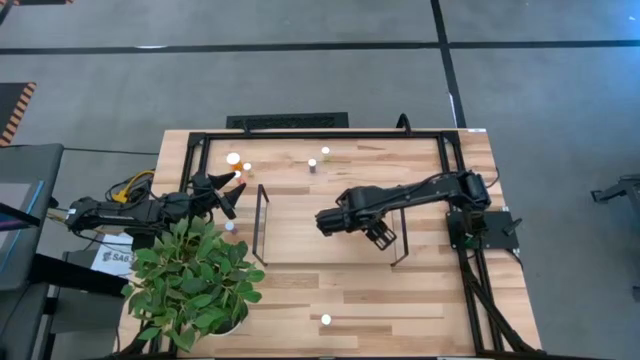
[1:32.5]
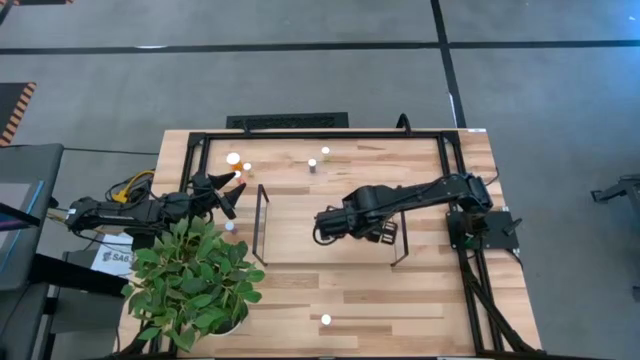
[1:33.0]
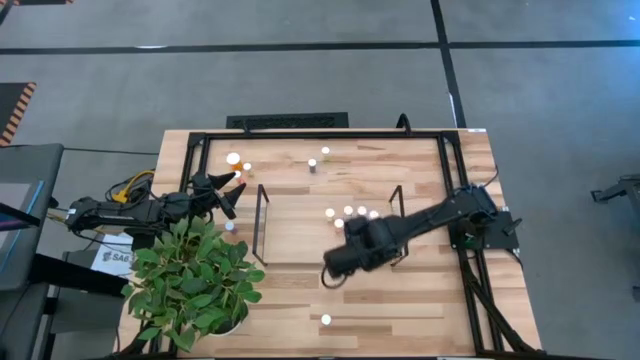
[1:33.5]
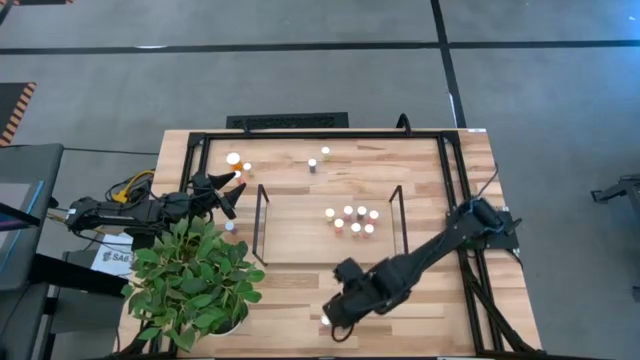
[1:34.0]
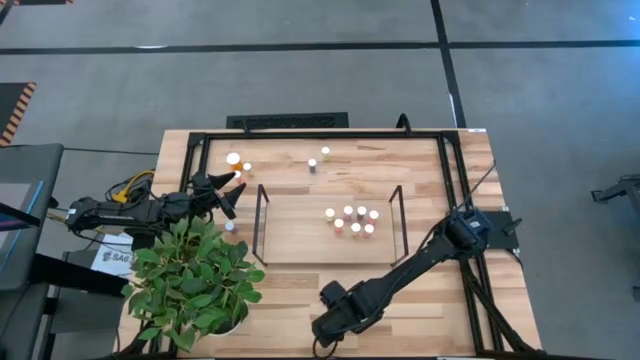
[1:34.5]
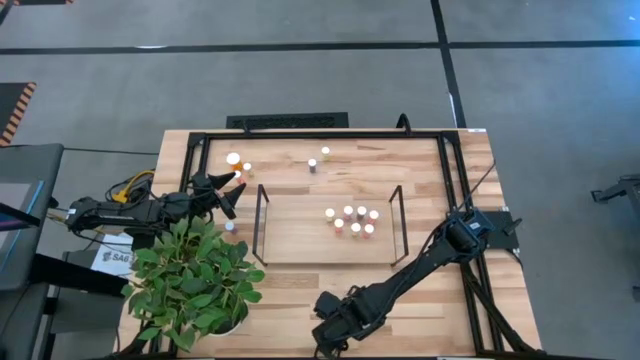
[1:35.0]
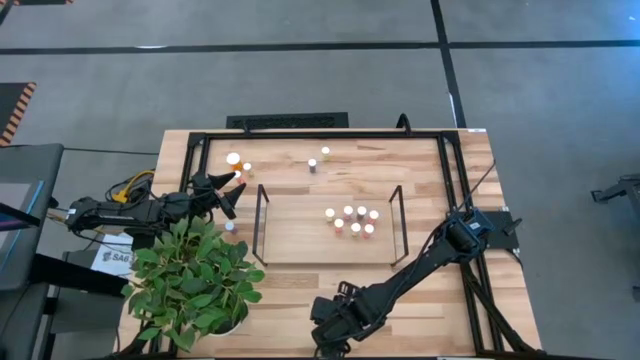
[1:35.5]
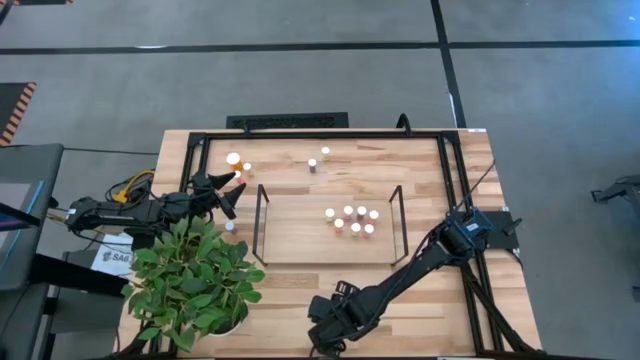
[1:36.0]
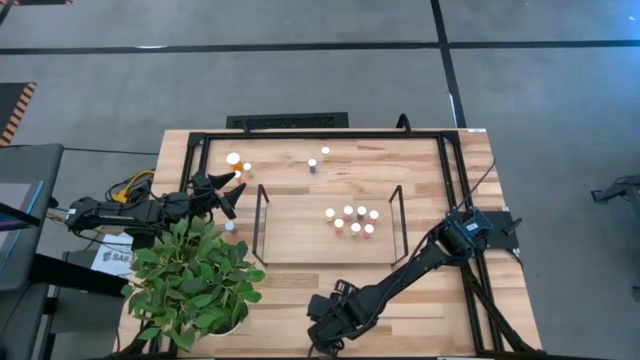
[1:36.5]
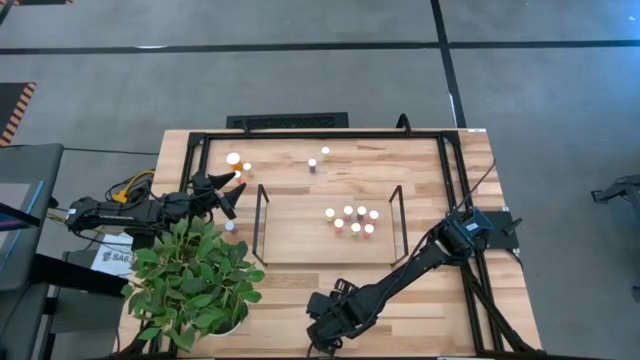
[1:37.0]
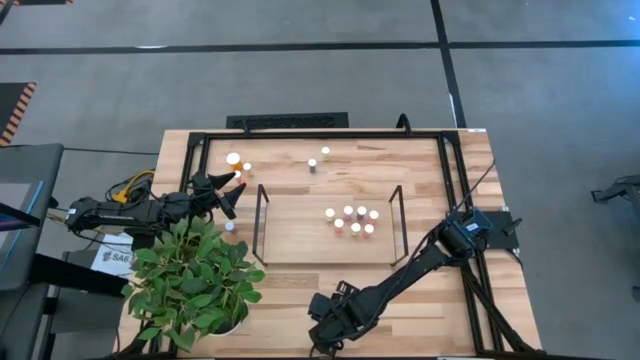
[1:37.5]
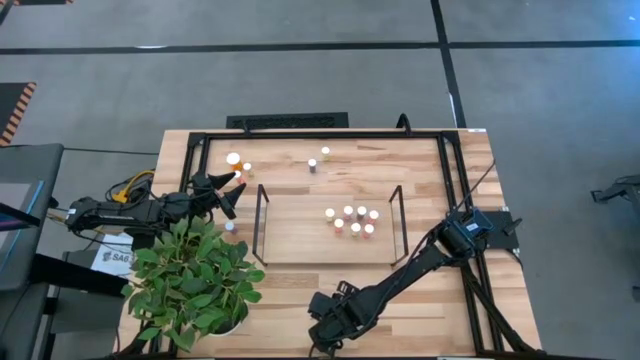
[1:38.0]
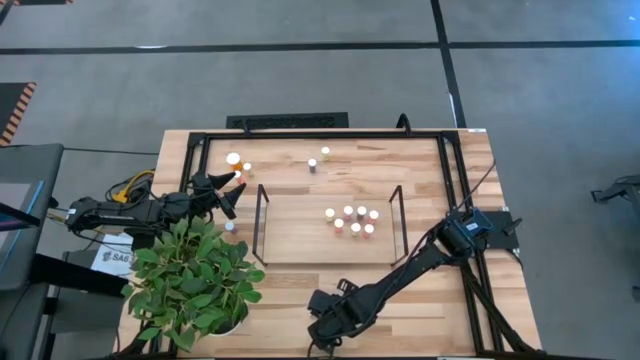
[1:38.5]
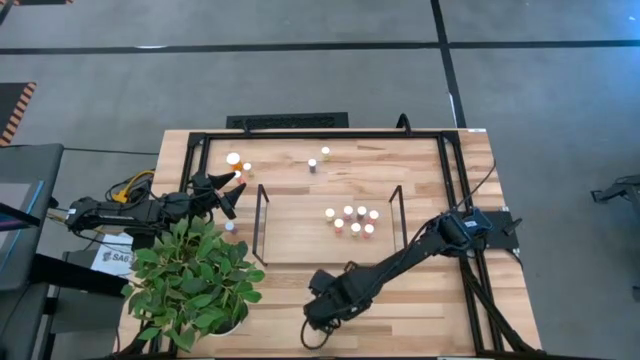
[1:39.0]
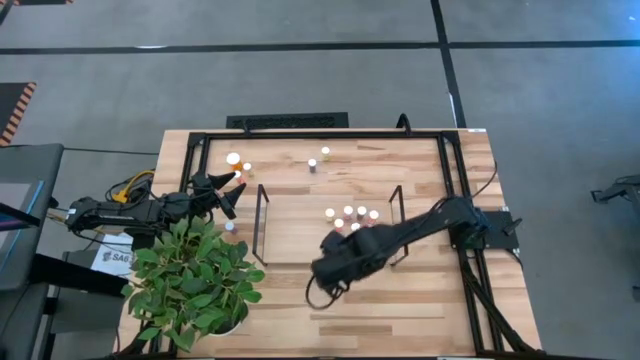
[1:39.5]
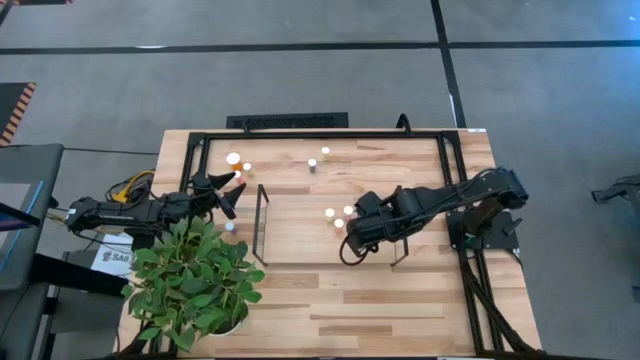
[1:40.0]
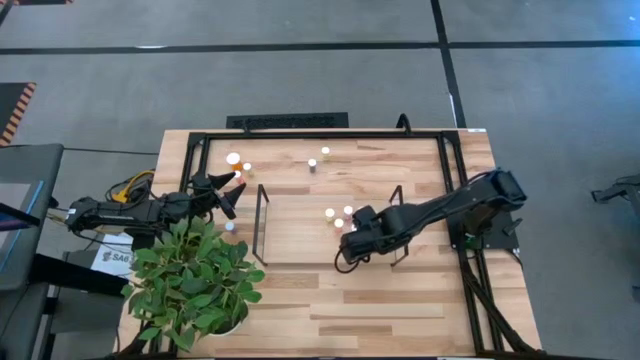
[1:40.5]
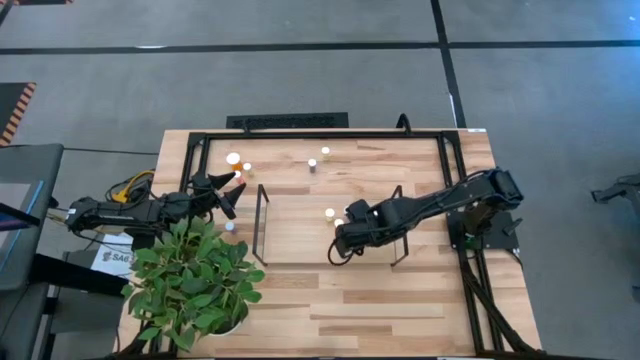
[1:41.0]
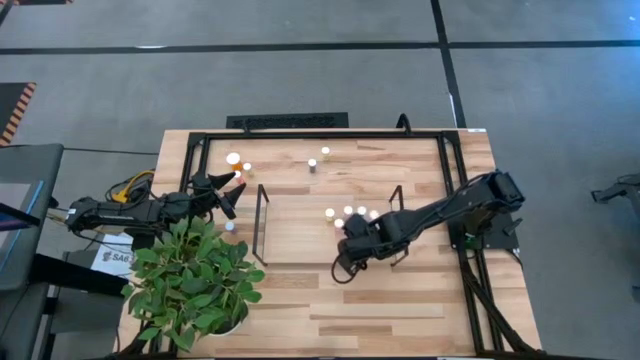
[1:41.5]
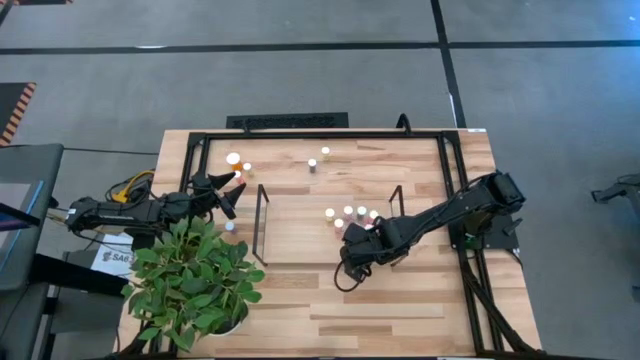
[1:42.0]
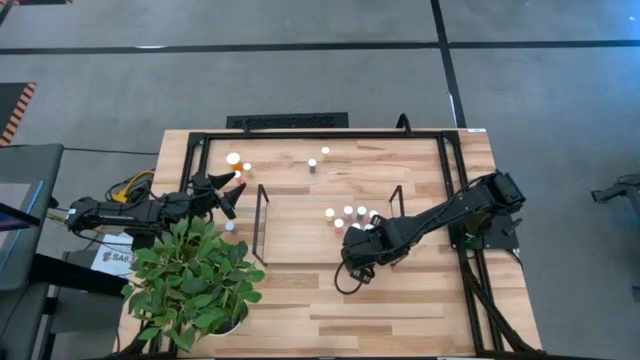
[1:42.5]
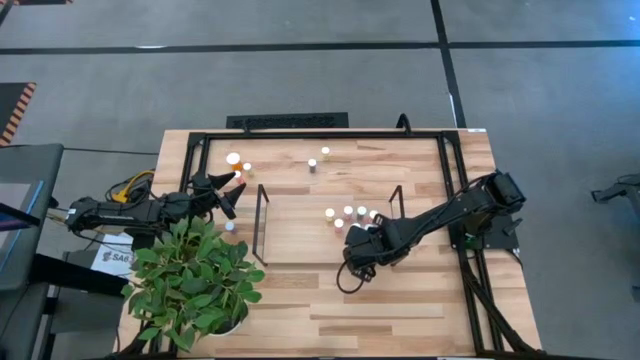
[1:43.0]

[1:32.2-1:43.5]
Task: Pick and place medicine bottles onto shelf by color
Put the red pill bottle on the shelf

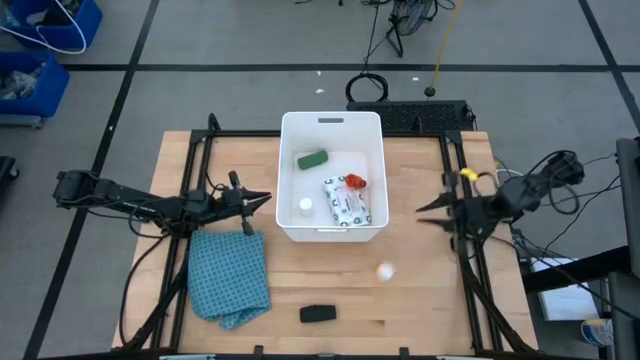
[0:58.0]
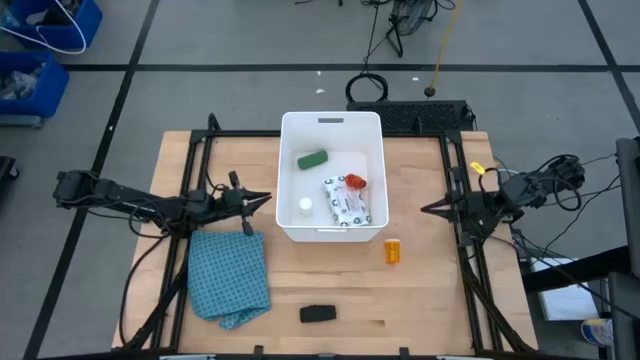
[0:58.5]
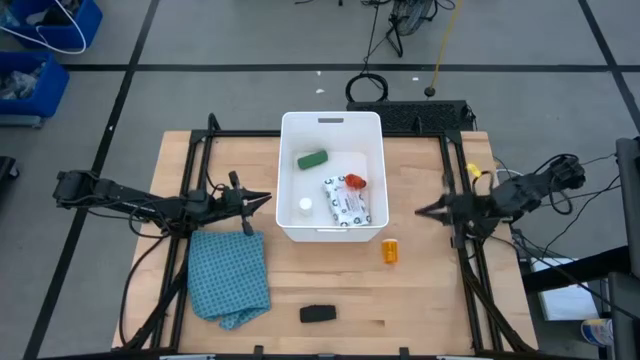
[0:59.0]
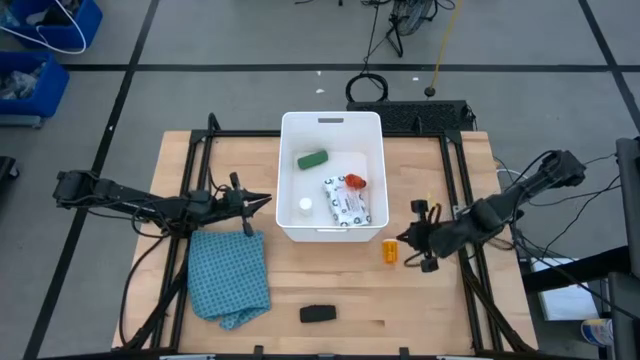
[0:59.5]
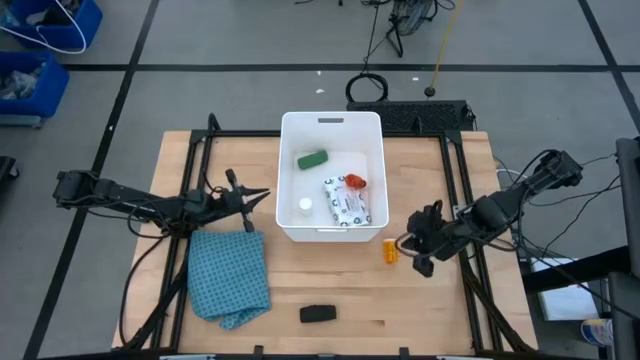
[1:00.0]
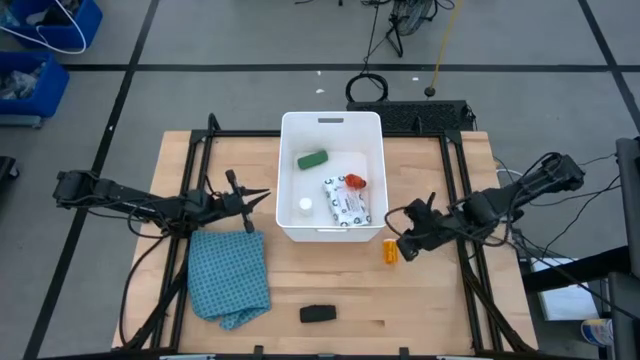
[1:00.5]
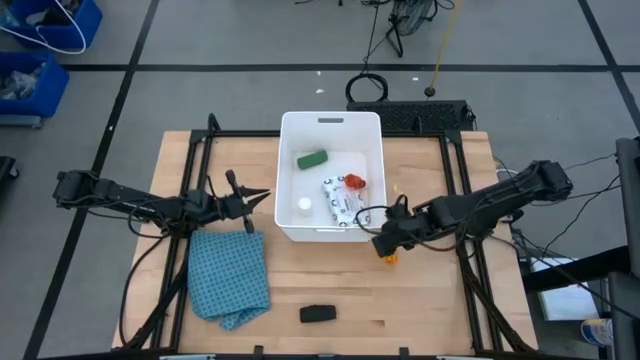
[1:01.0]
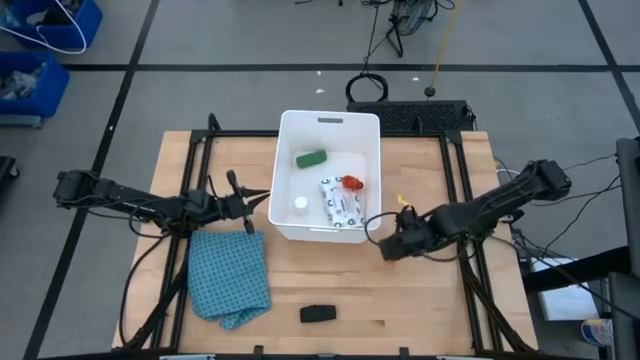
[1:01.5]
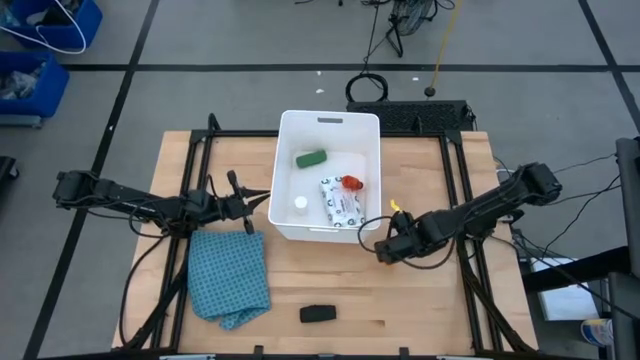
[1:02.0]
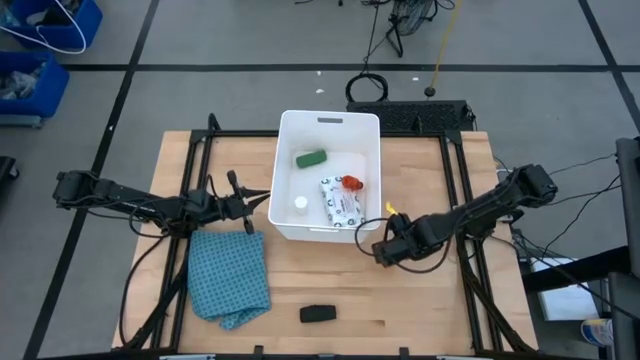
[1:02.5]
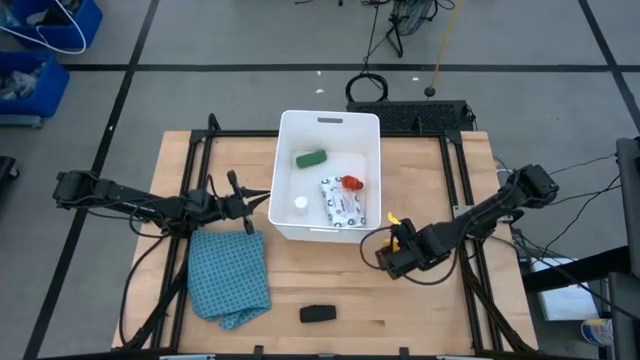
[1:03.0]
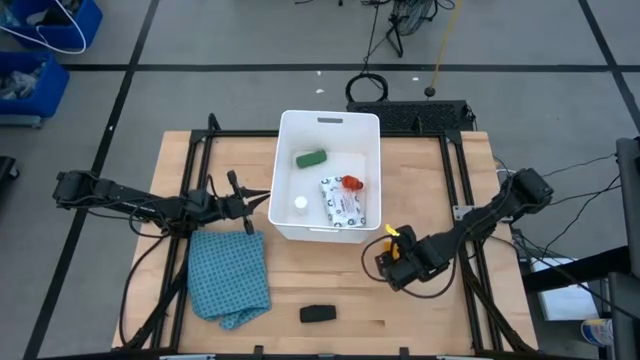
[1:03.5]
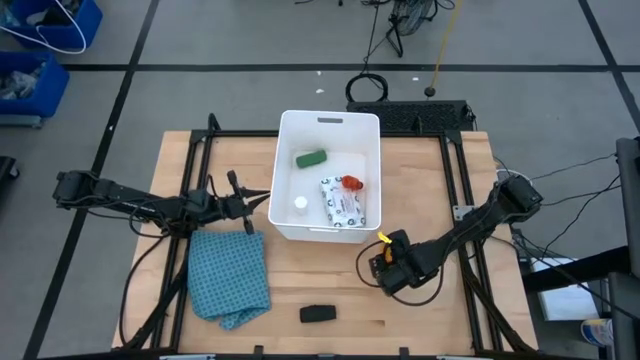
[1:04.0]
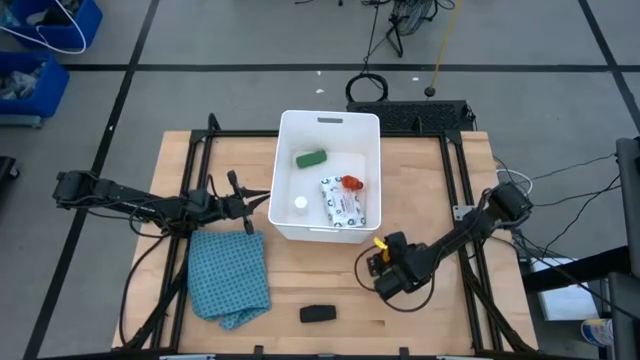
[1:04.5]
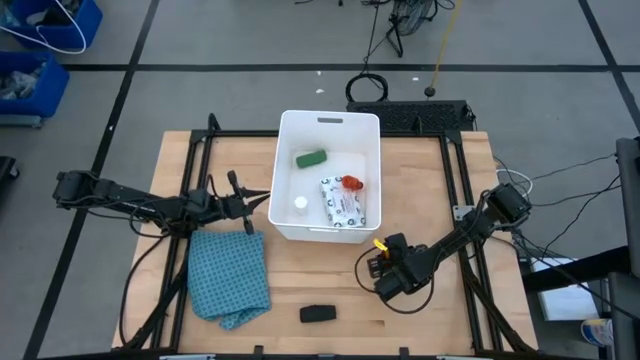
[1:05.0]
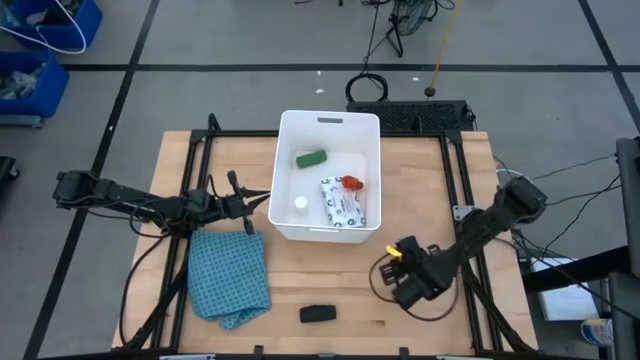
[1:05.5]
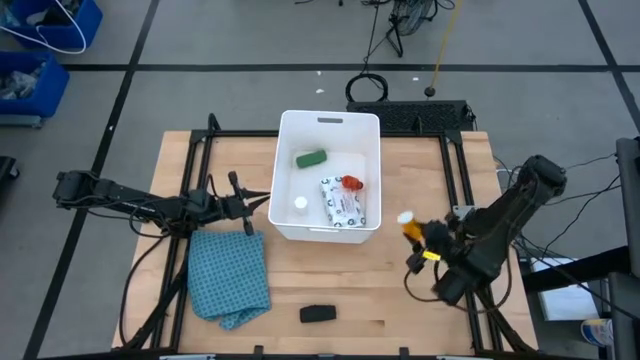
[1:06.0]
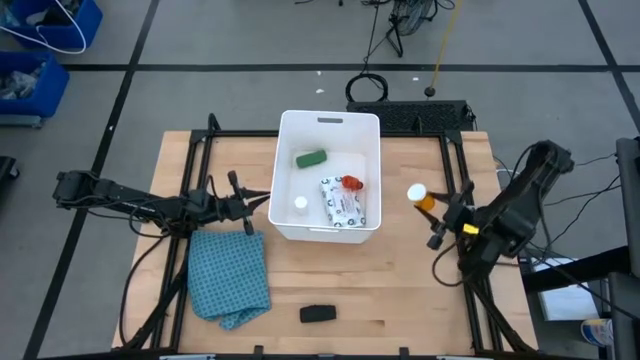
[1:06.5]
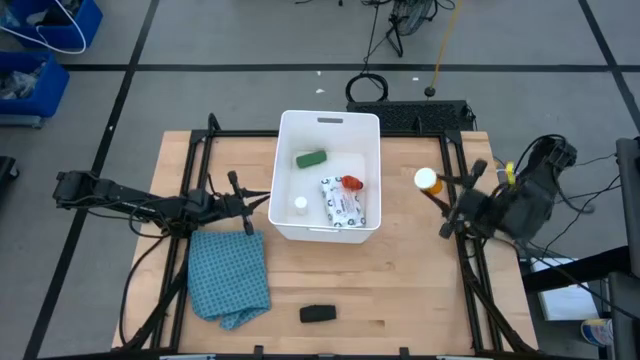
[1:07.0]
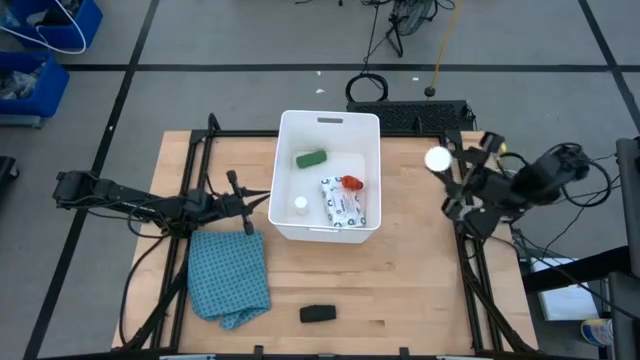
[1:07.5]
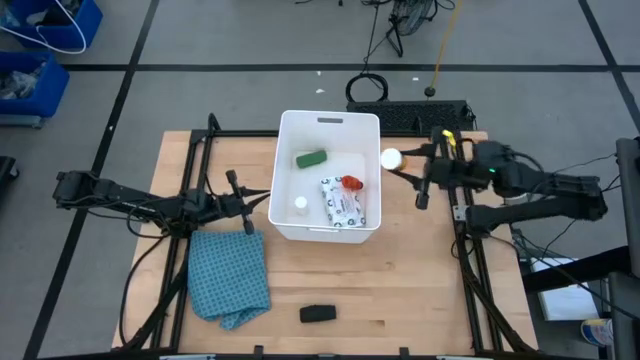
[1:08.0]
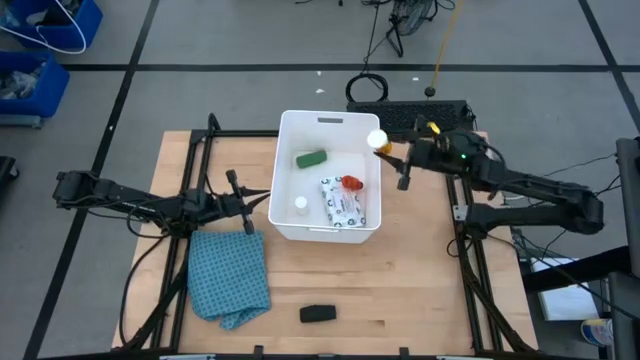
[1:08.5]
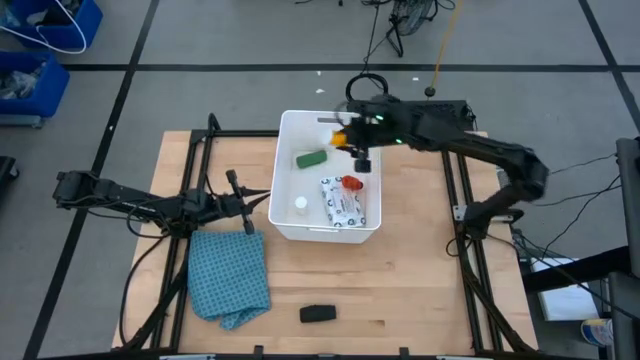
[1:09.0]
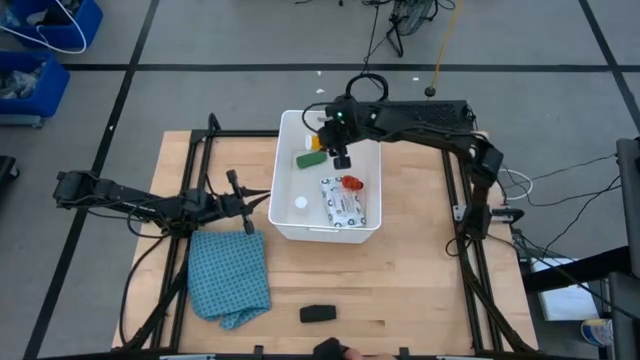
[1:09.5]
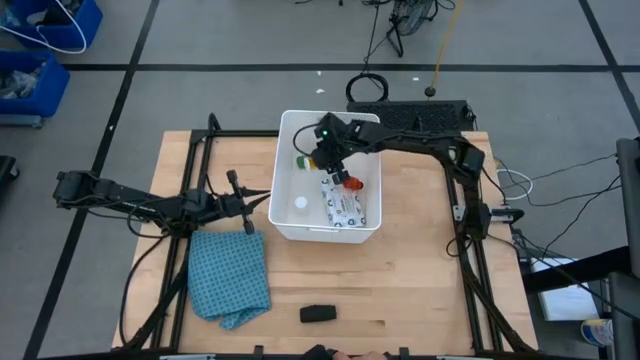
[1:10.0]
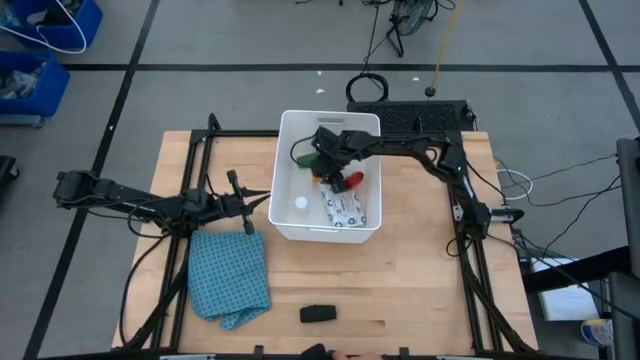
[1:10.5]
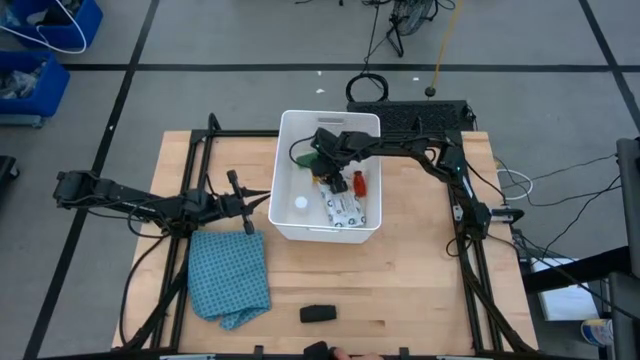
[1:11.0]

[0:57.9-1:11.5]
Task: Pick & place medical supplies in basket/bin
Put the orange pill bottle into the white bin
